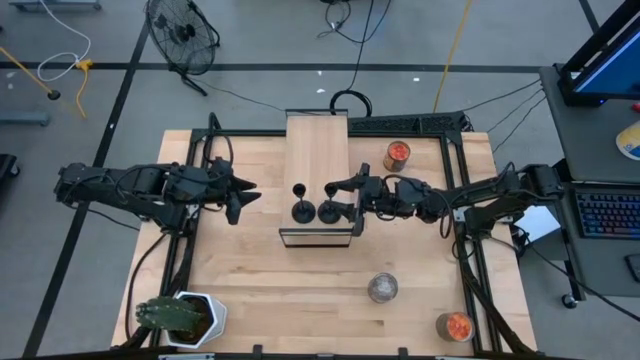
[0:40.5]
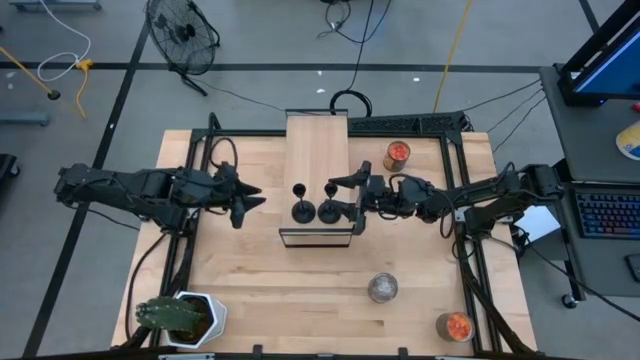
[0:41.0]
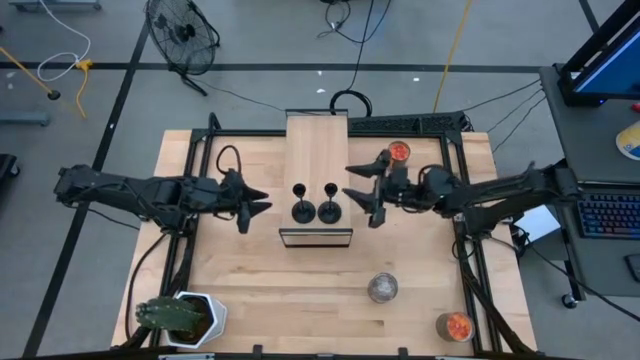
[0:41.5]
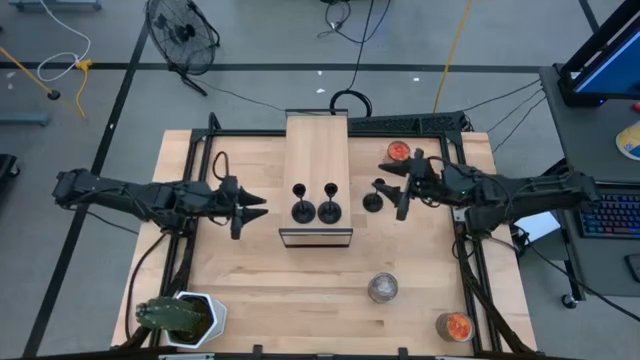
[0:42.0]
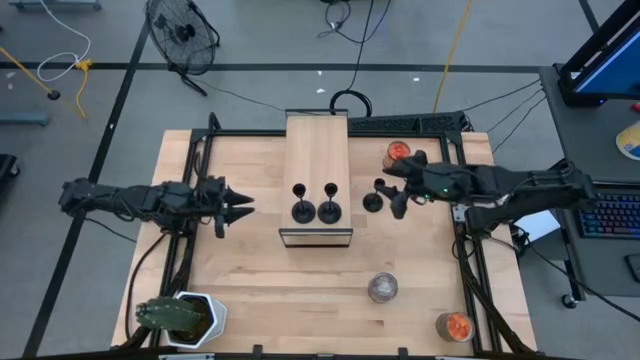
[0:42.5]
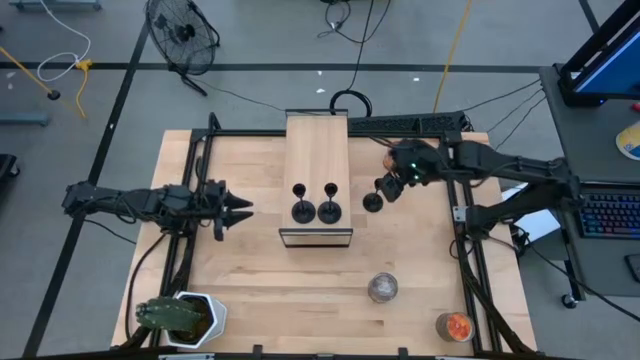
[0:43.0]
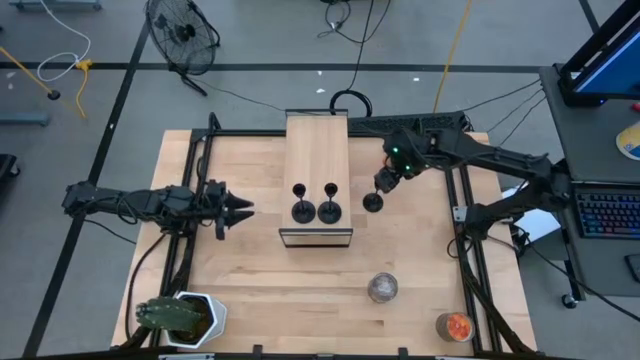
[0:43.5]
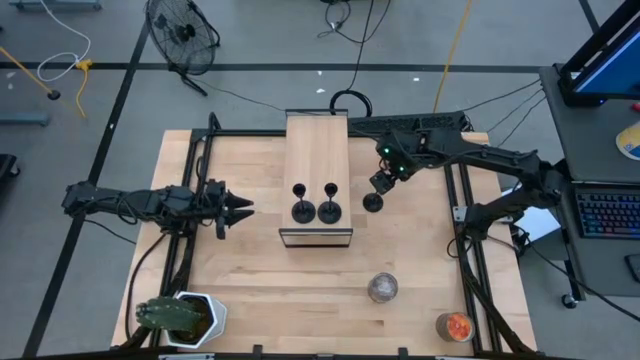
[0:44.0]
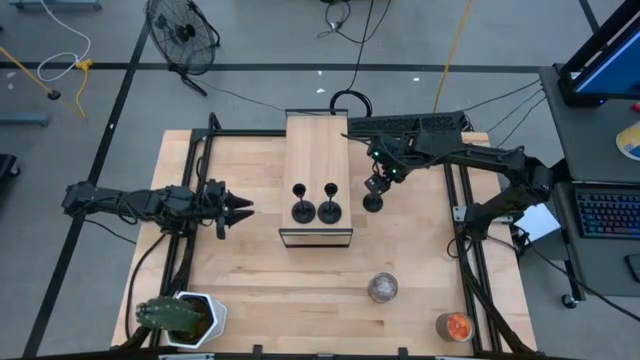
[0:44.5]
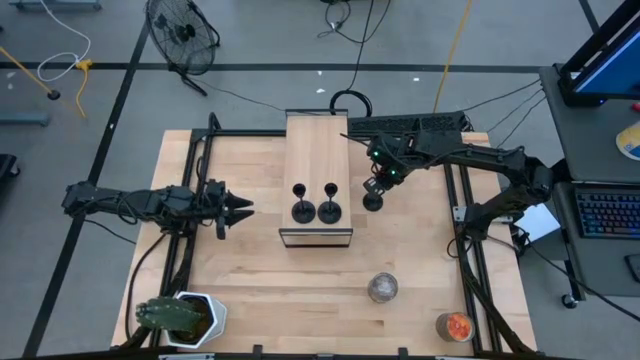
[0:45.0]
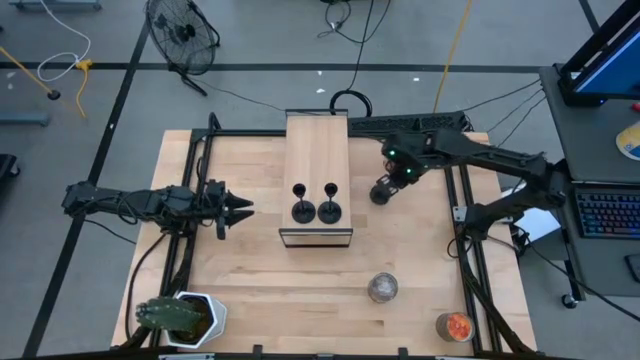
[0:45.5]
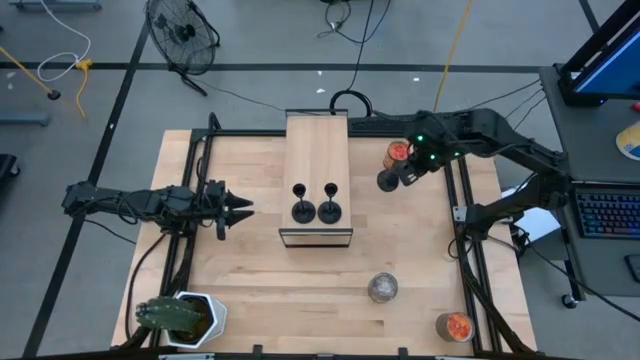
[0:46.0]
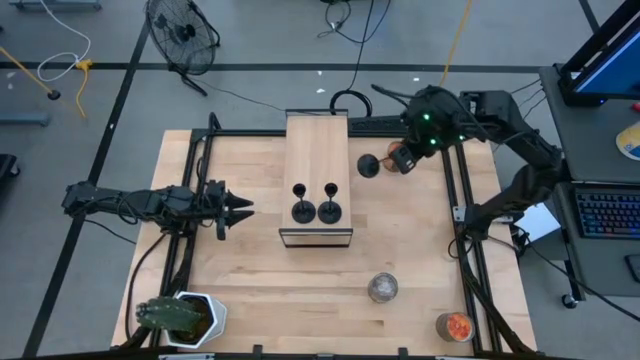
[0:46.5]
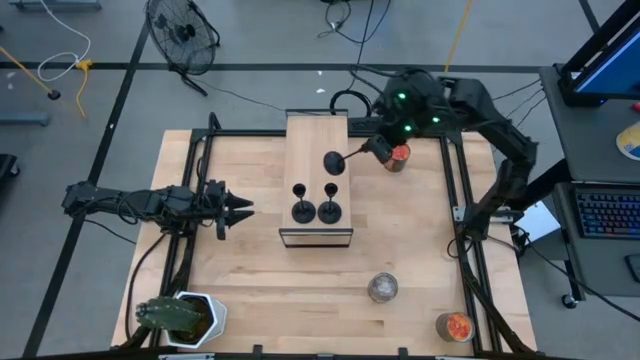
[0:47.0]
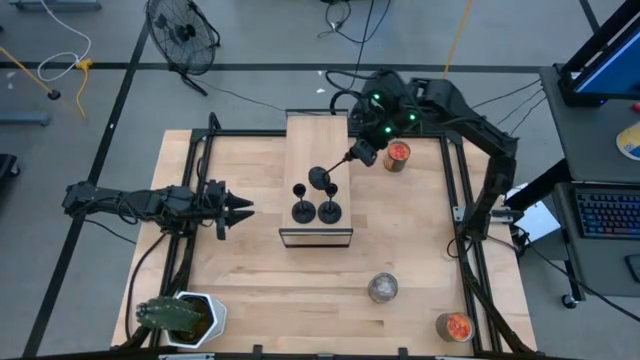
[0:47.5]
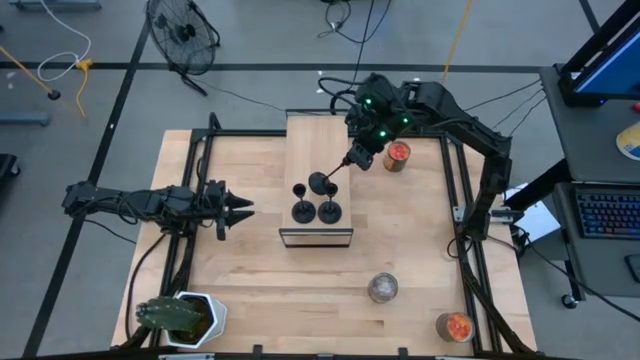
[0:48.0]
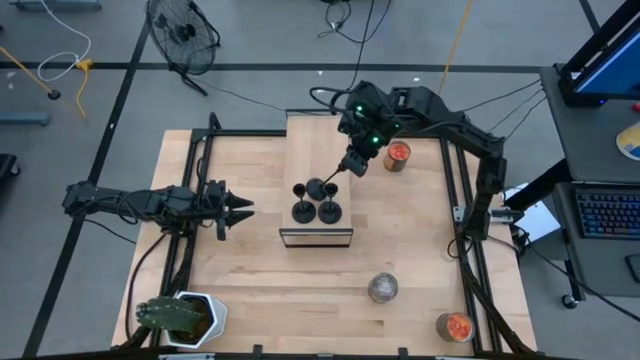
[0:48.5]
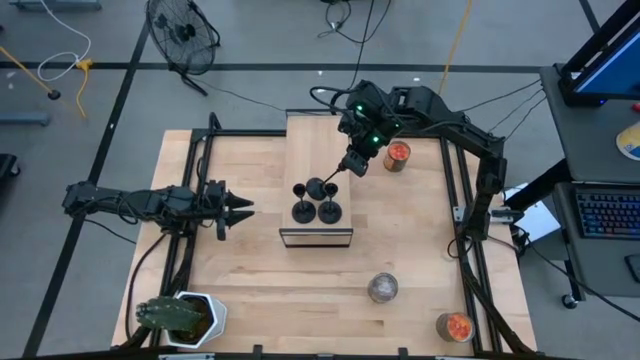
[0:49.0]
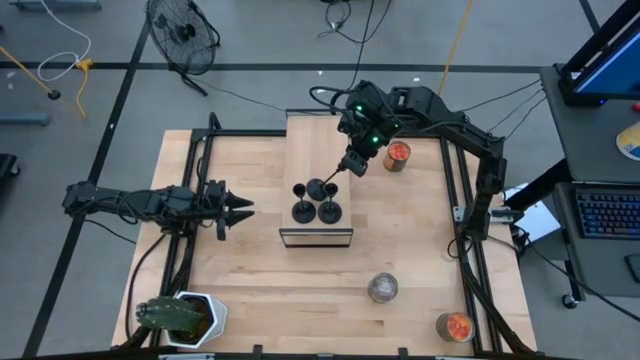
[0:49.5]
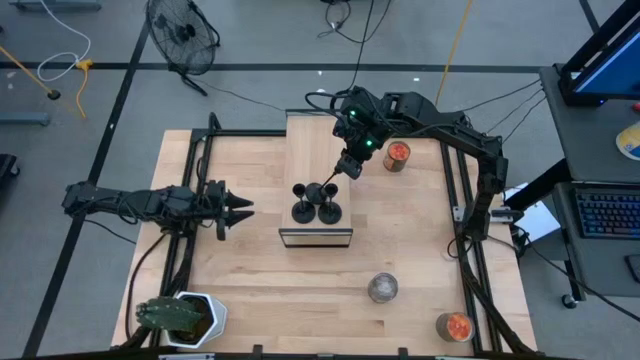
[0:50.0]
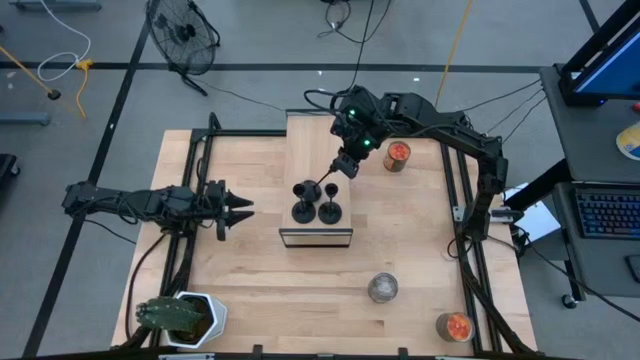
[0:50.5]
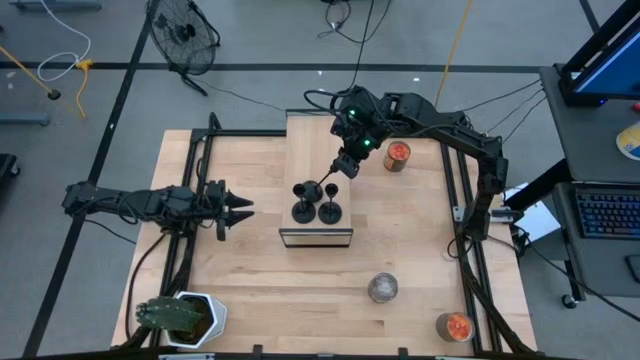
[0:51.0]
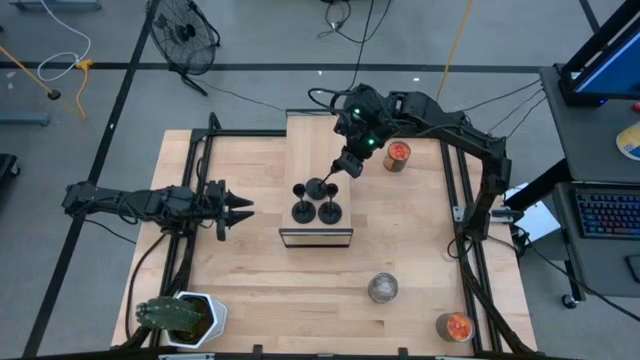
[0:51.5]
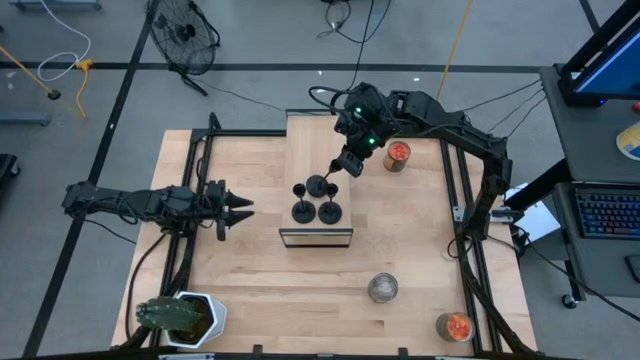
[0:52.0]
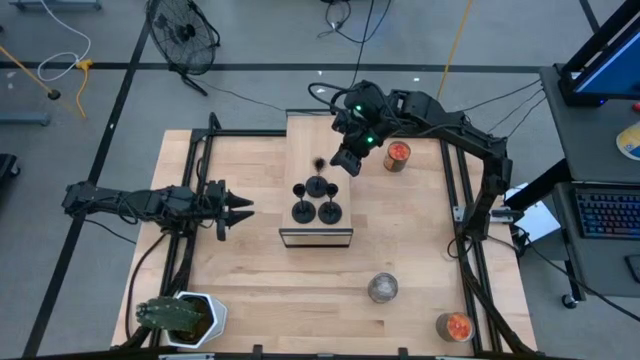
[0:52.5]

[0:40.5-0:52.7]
Task: Pick & Place candle stick holders
Put the black candle holder on the shelf

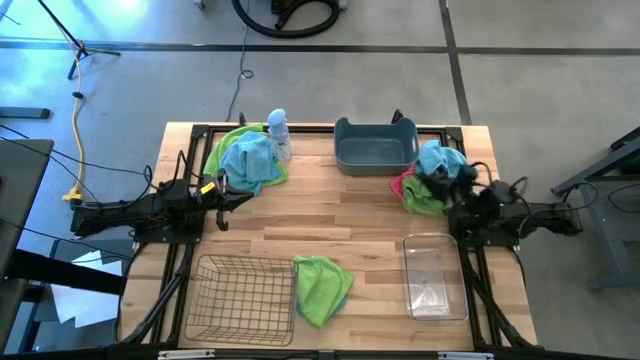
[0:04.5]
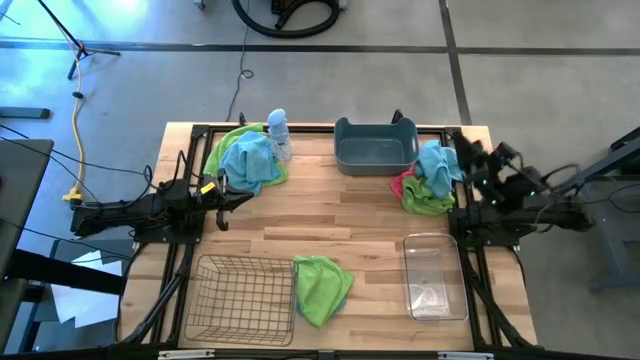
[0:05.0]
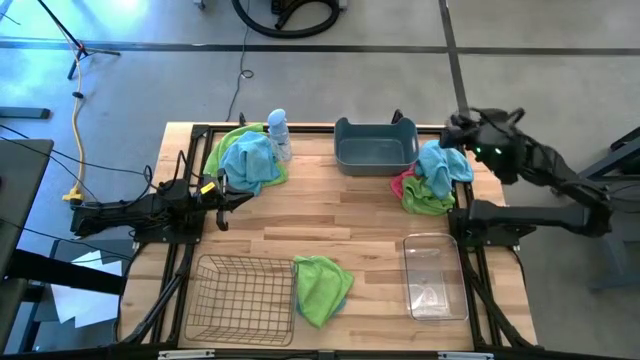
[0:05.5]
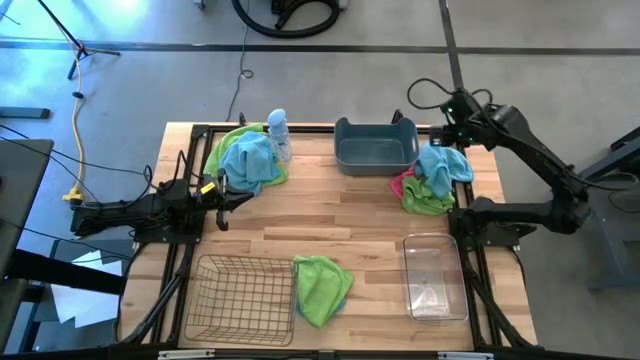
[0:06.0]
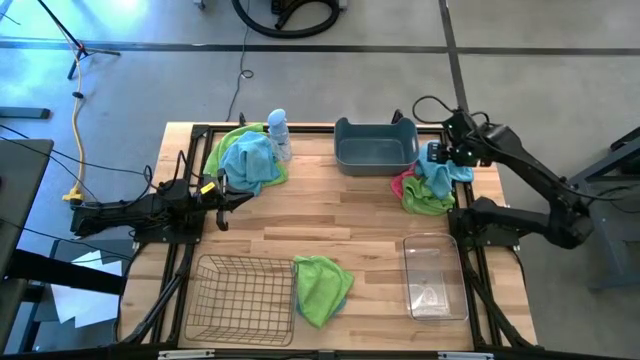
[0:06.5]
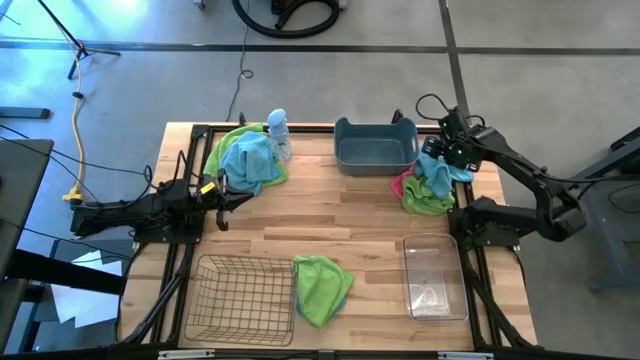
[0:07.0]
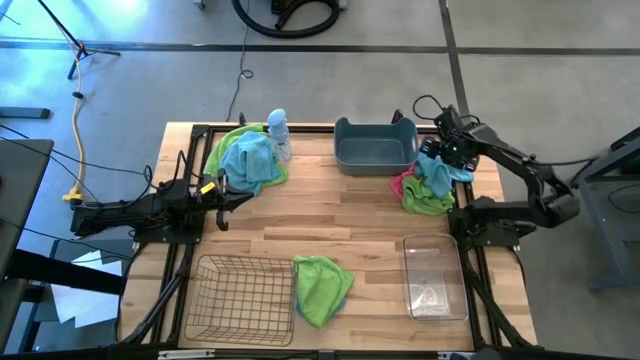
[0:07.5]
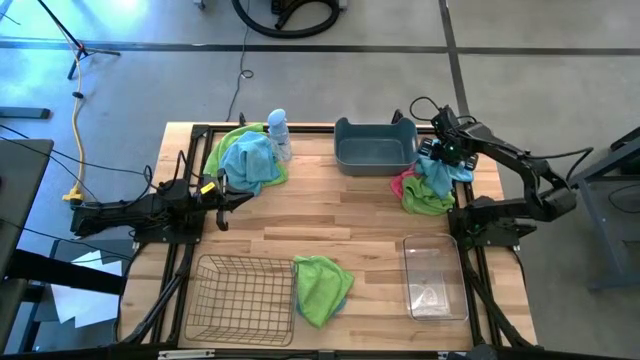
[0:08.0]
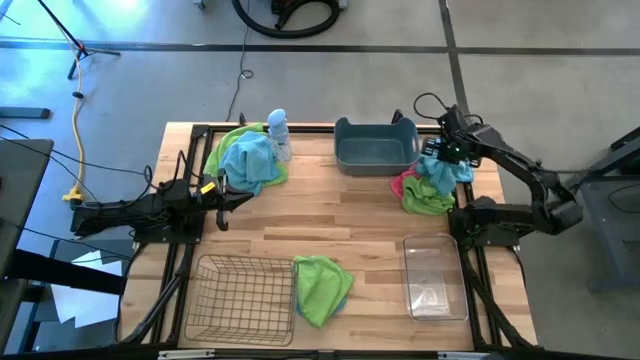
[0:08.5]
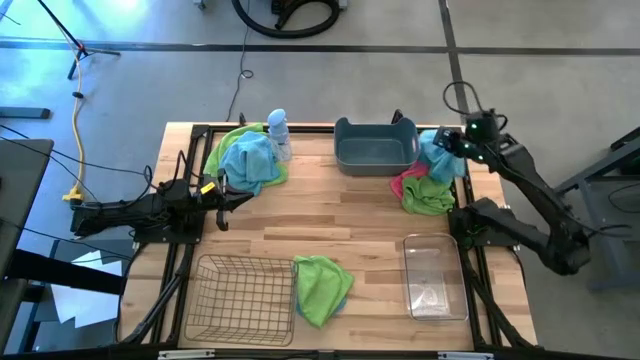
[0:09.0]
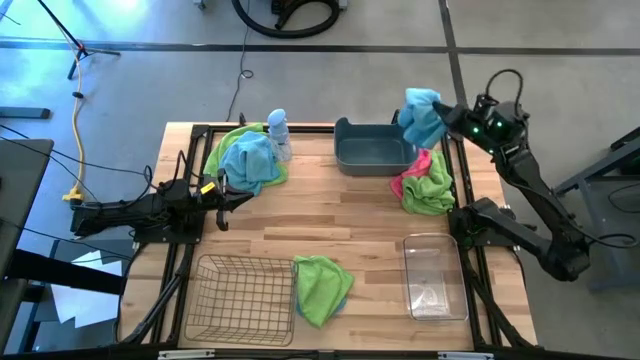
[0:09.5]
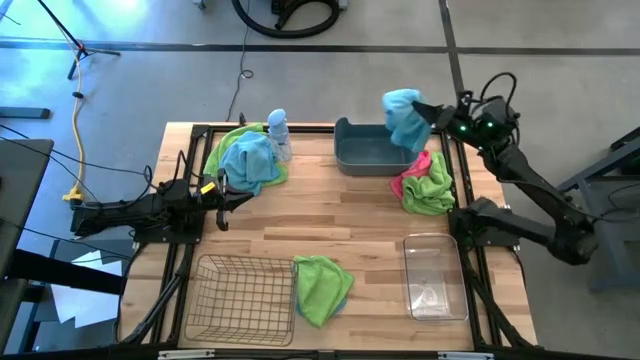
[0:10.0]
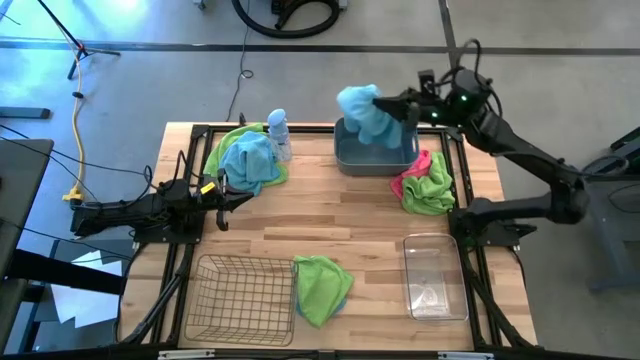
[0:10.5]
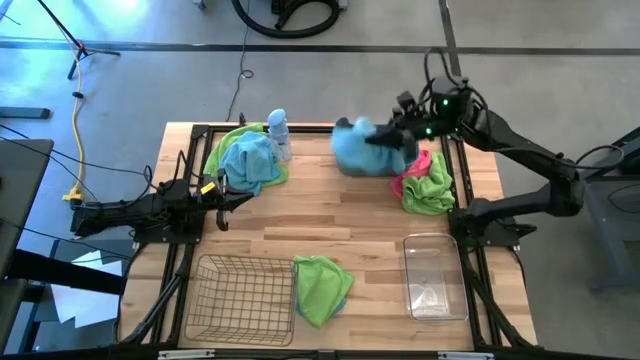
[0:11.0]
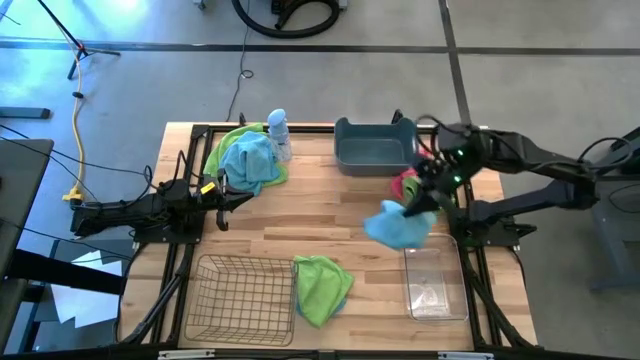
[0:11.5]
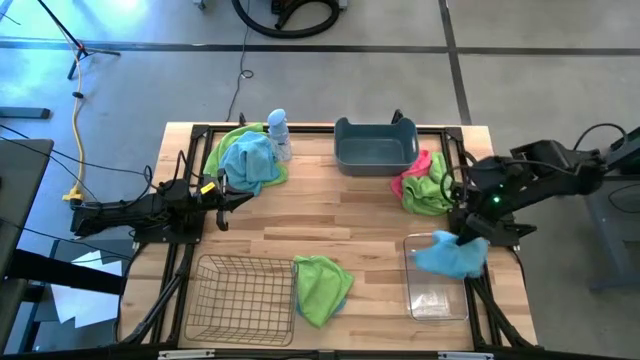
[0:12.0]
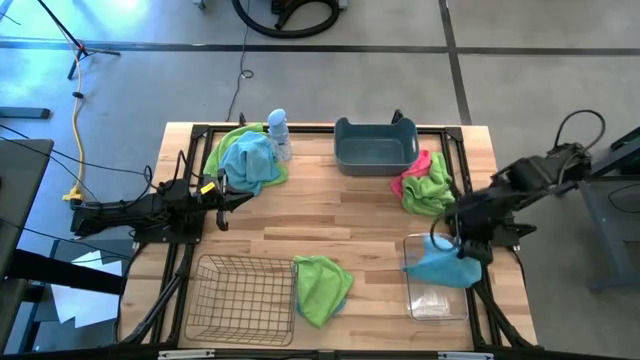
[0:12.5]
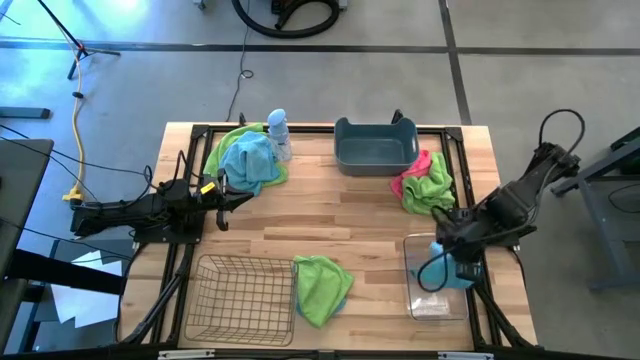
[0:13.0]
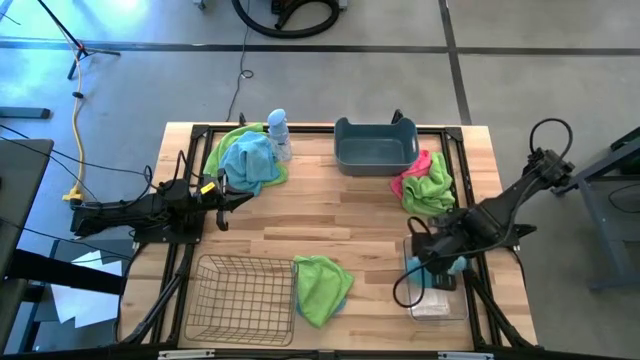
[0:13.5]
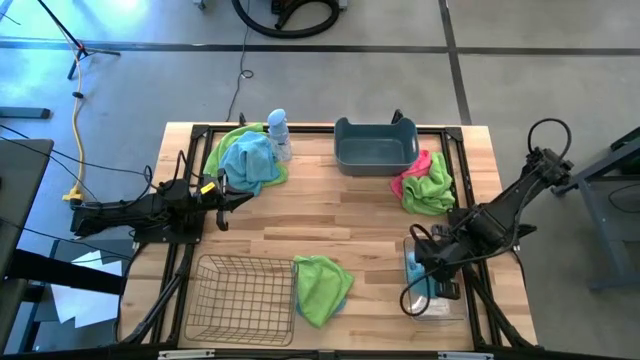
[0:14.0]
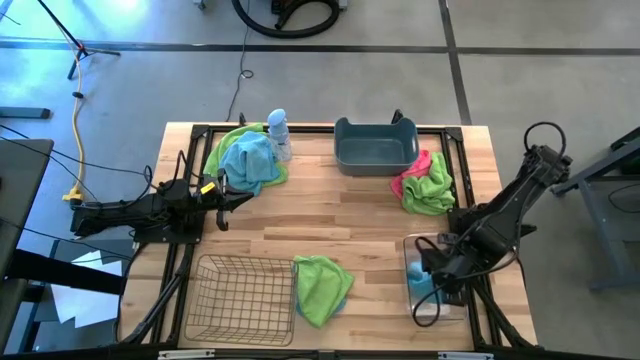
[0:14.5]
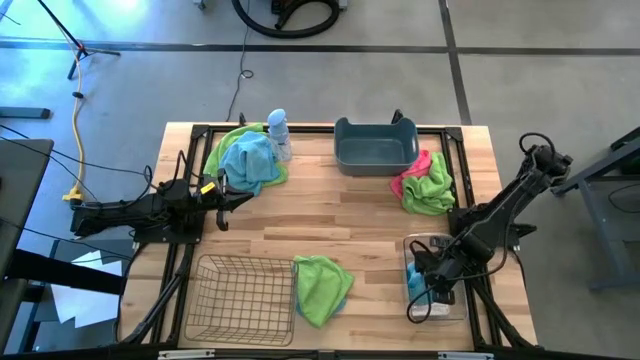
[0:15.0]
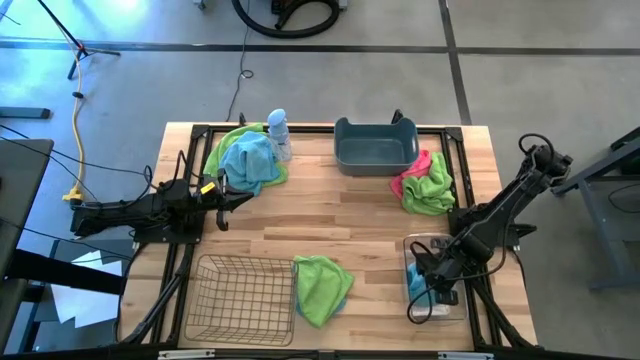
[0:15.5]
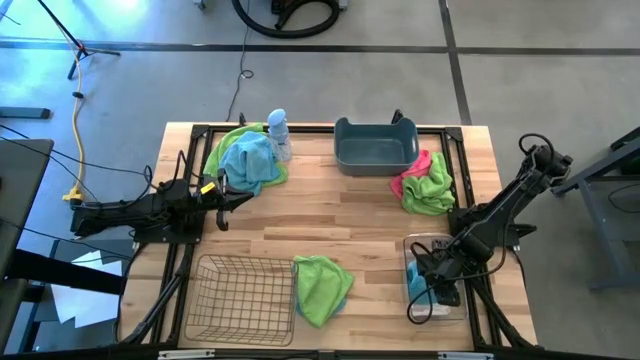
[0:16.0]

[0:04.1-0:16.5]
Task: Sort microfiber towel by color & place in baskets
Put the top right blue towel into the transparent bin
